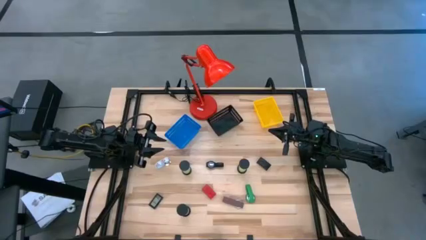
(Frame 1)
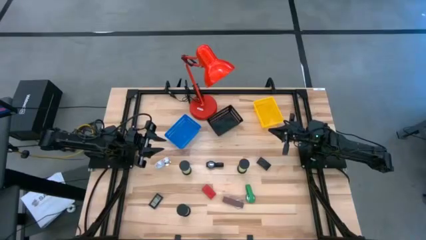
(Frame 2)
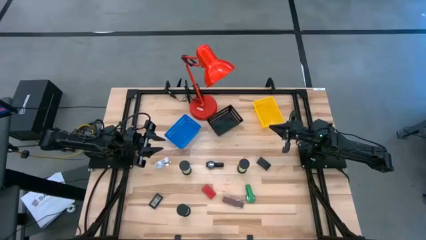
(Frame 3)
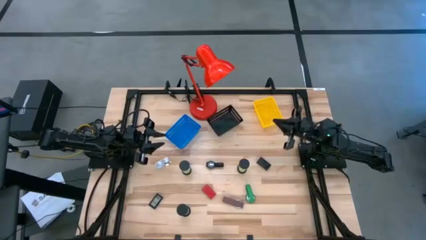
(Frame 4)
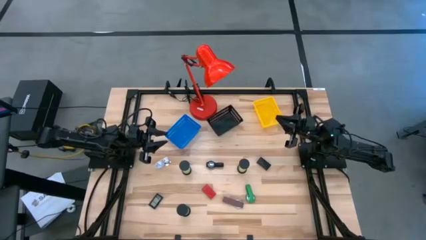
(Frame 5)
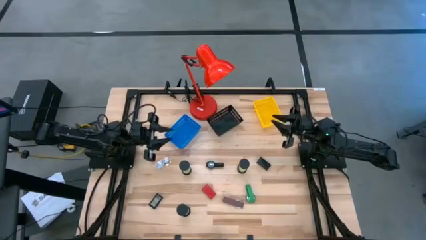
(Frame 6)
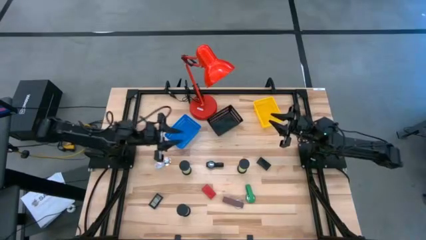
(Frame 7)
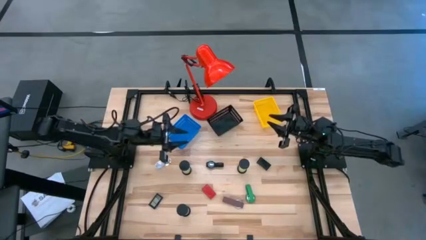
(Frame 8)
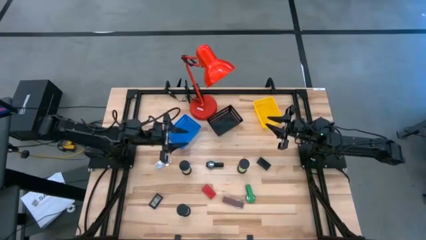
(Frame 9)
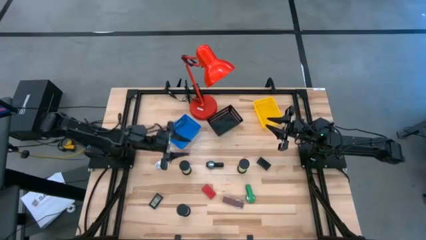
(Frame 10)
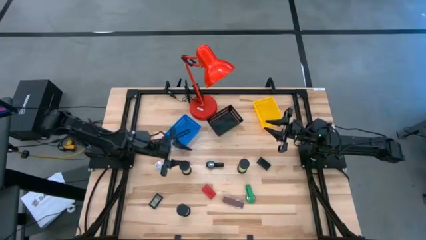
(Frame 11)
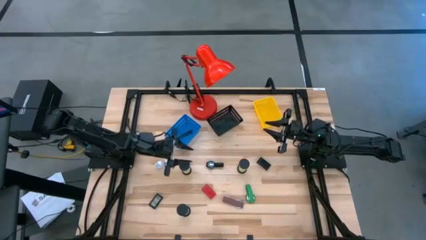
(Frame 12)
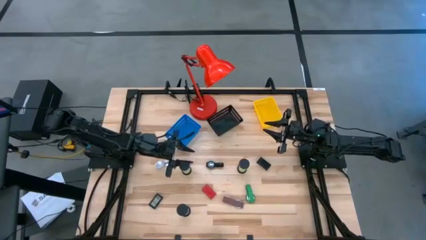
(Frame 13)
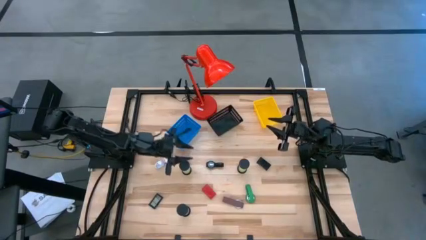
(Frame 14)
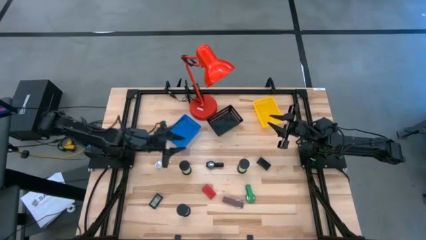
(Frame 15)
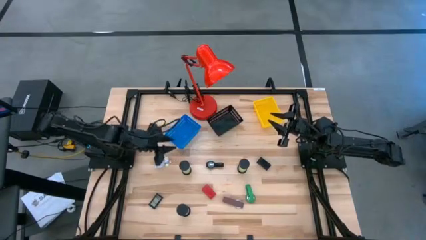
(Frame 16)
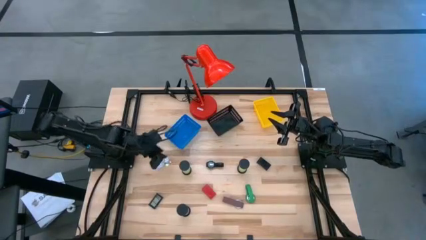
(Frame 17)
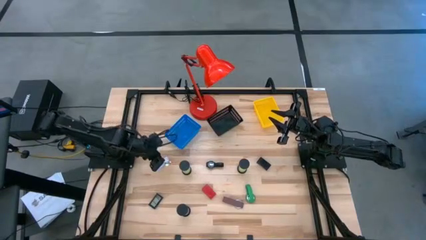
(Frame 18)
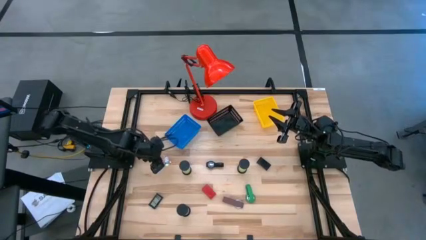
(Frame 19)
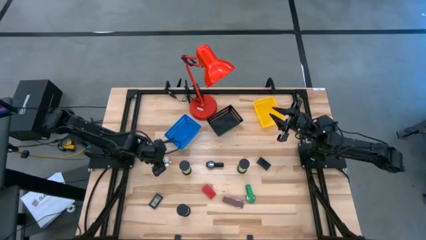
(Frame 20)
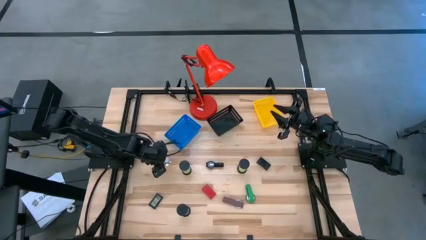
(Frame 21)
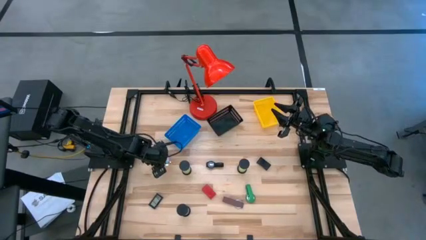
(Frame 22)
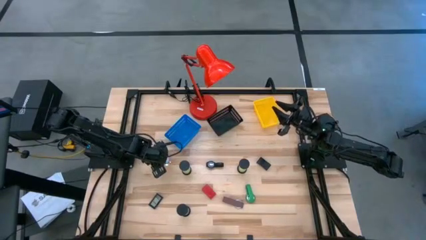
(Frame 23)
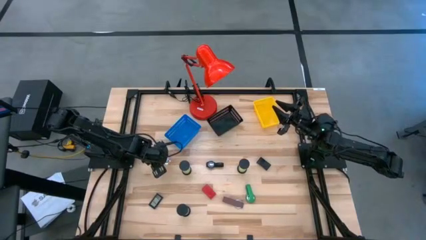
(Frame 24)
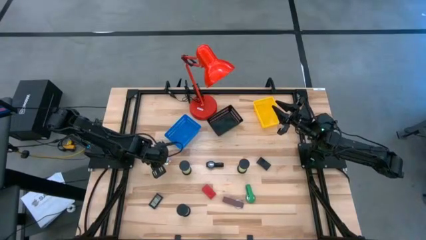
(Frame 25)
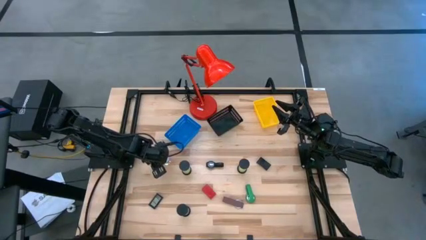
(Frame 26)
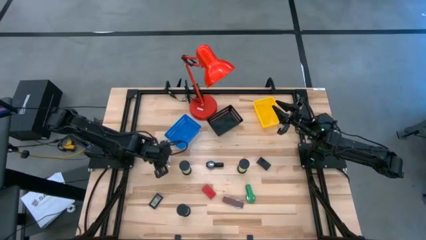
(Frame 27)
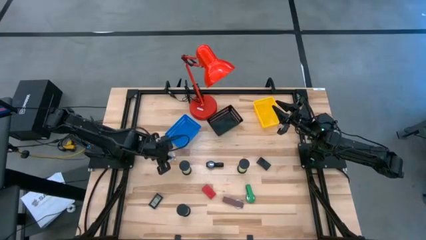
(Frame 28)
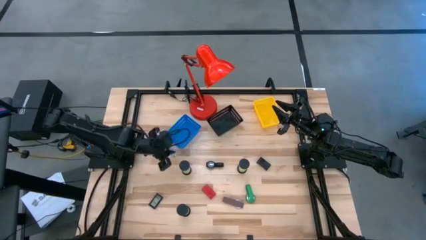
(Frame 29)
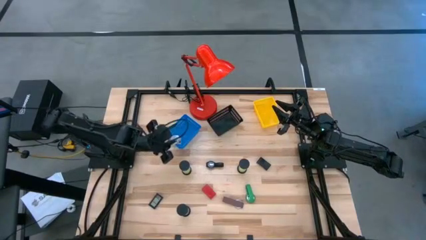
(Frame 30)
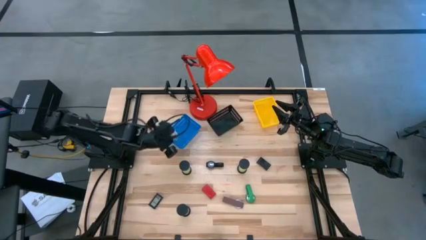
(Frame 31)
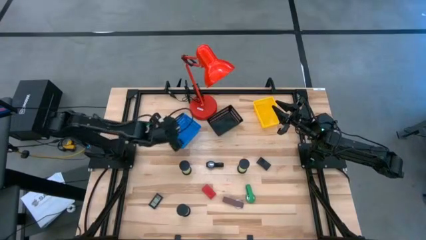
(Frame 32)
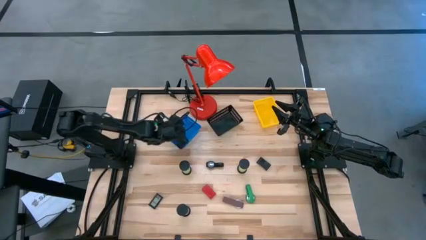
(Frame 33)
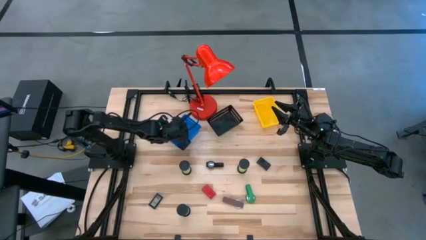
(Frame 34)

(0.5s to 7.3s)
Task: Pick & Place Office items
Put the white wristwatch into the blue bin

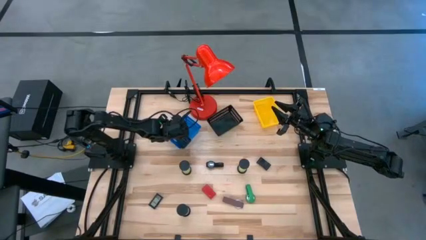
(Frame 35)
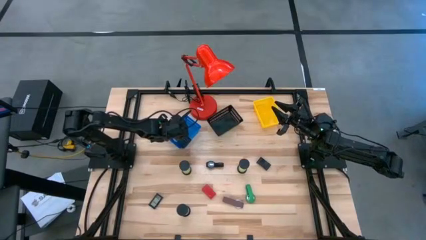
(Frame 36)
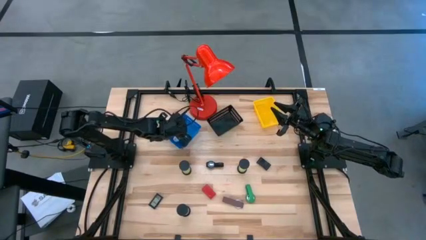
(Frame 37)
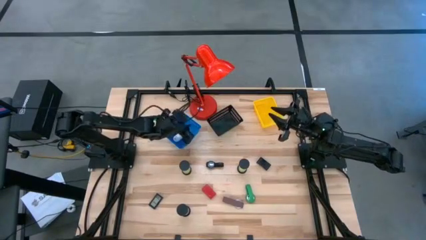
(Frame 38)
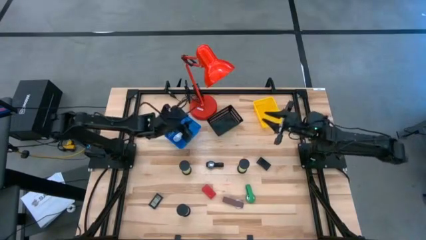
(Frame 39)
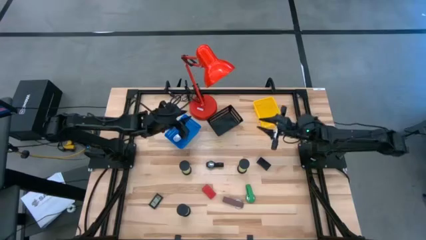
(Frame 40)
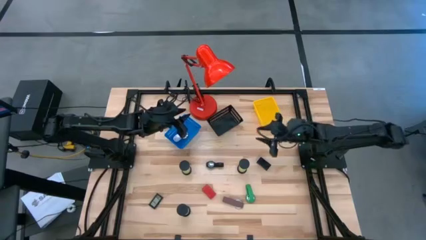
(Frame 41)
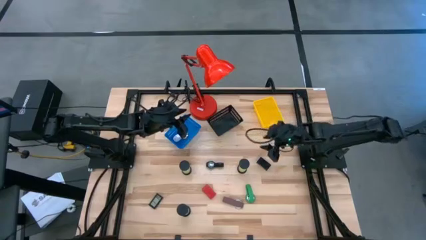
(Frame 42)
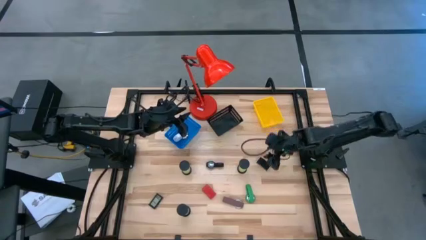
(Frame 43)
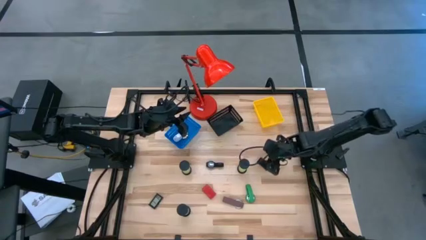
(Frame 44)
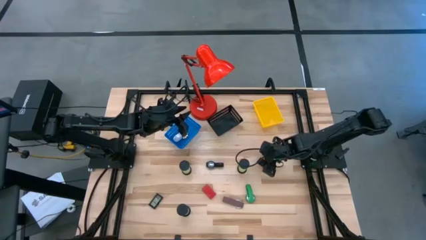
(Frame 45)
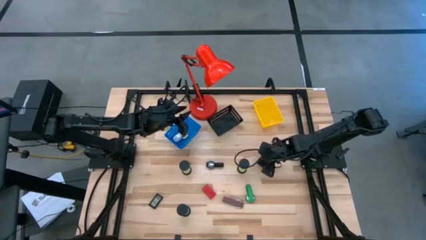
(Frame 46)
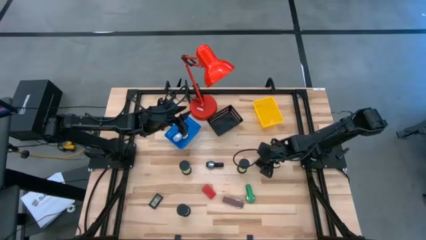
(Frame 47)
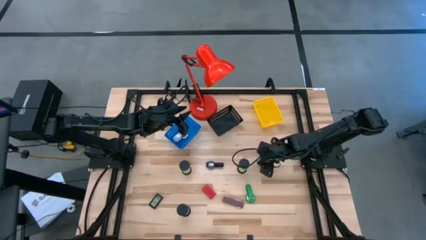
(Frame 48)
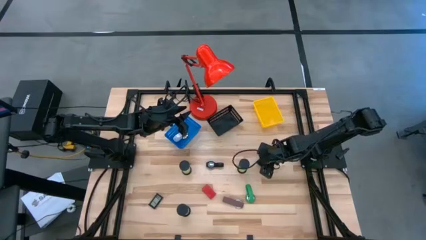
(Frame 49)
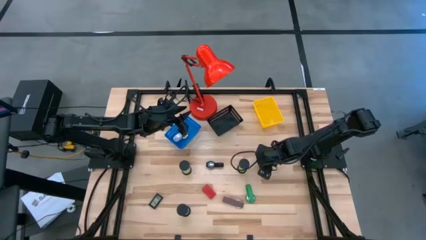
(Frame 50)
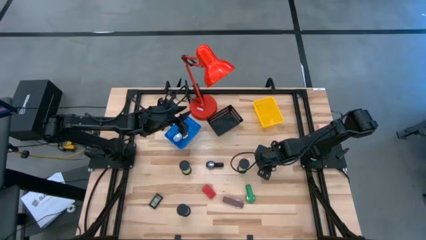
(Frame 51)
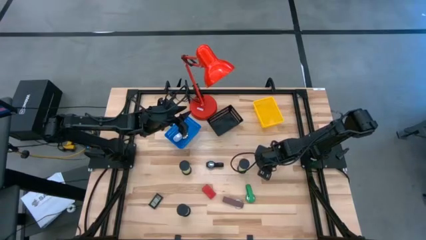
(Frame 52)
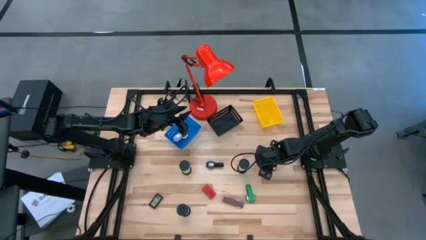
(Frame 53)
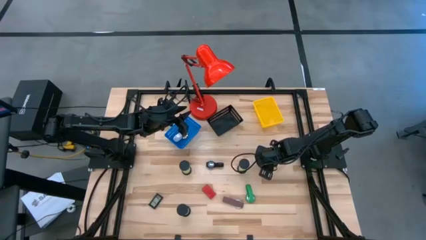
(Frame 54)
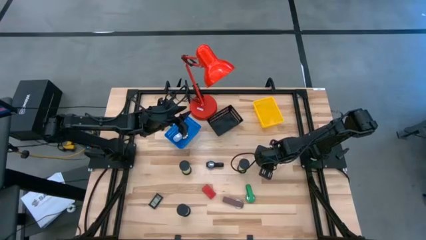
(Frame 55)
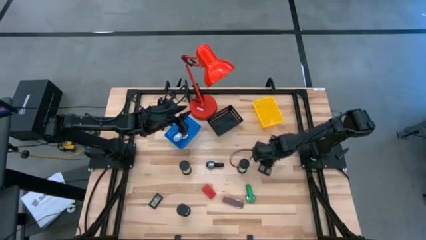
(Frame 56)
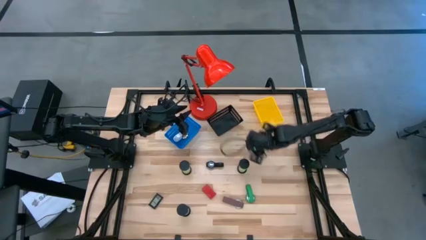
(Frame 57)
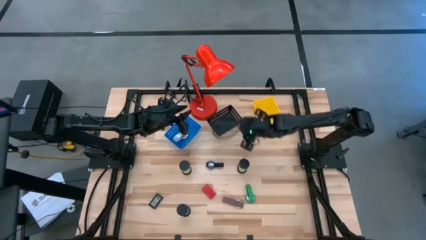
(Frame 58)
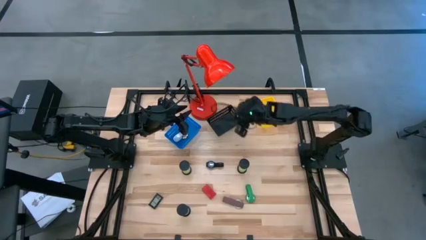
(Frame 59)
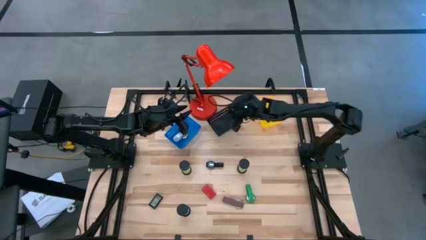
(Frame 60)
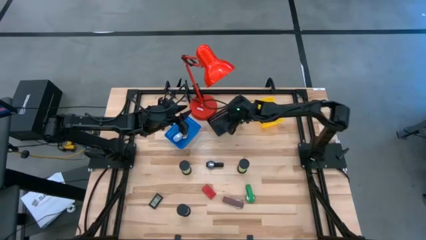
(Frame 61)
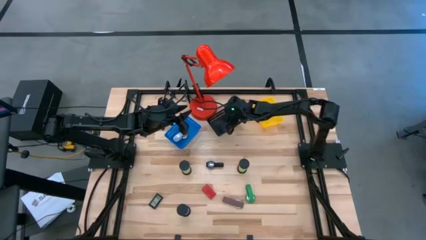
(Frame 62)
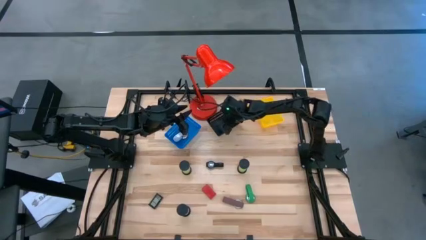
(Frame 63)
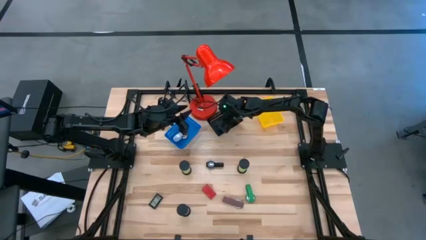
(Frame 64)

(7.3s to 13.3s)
Put the right black digital clock into the black bin

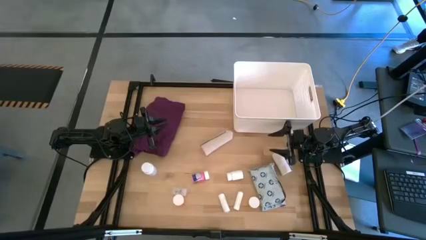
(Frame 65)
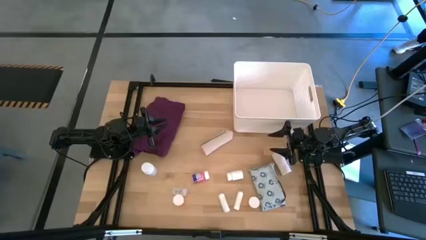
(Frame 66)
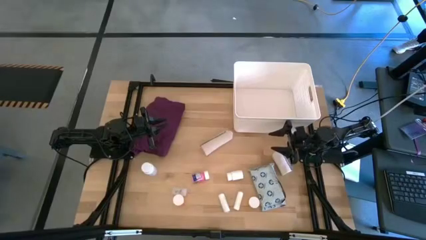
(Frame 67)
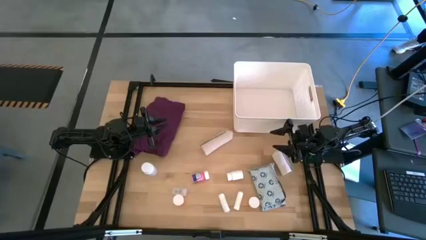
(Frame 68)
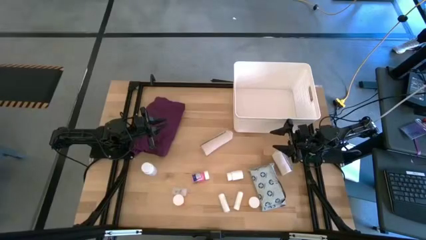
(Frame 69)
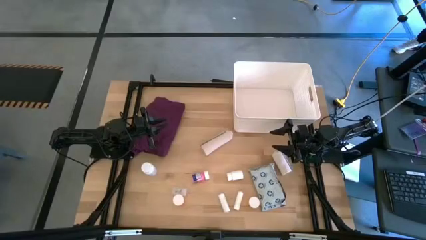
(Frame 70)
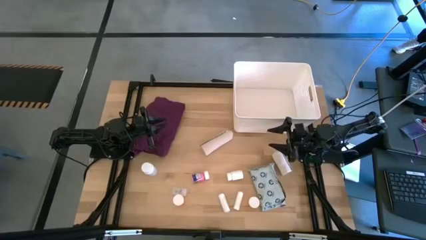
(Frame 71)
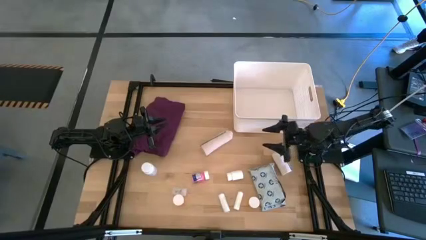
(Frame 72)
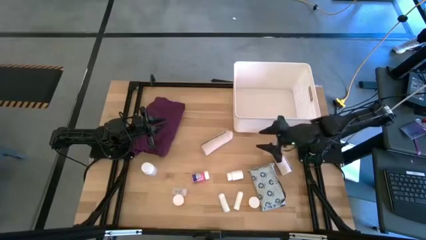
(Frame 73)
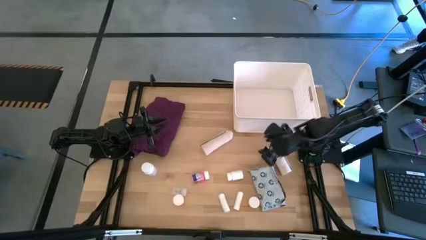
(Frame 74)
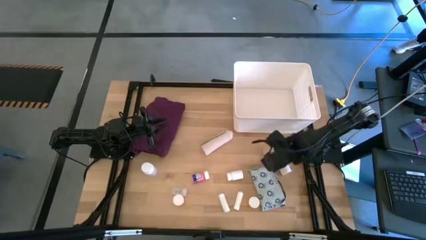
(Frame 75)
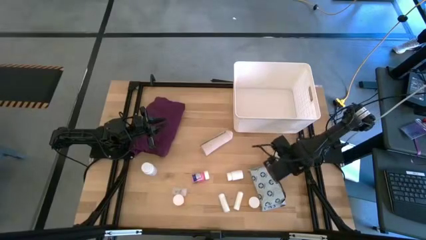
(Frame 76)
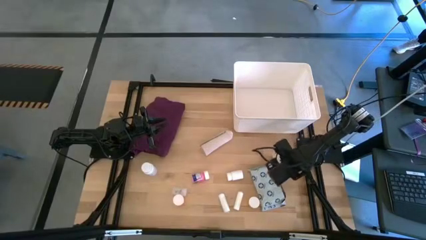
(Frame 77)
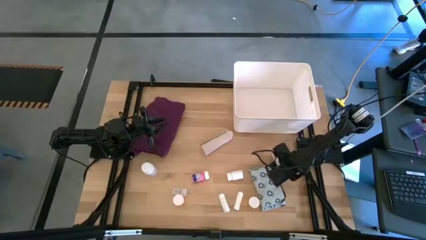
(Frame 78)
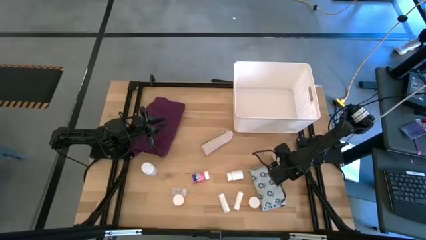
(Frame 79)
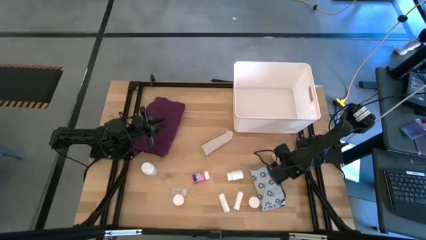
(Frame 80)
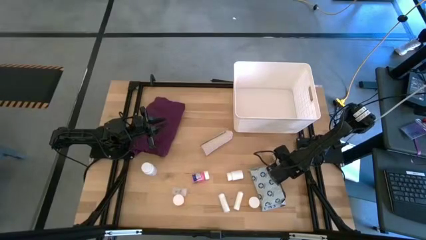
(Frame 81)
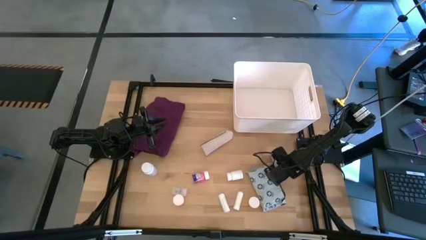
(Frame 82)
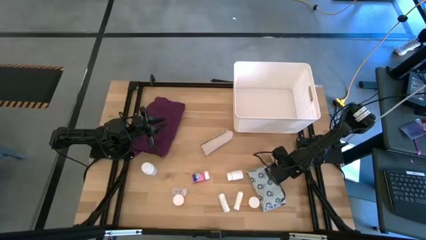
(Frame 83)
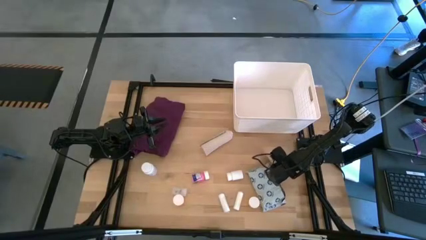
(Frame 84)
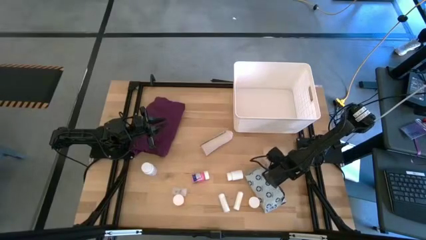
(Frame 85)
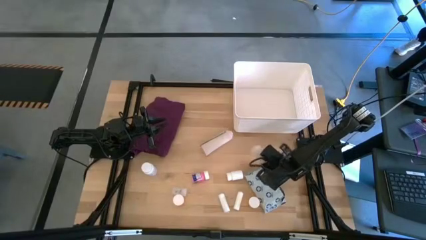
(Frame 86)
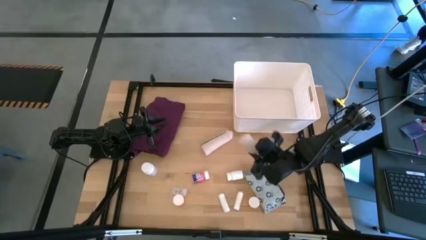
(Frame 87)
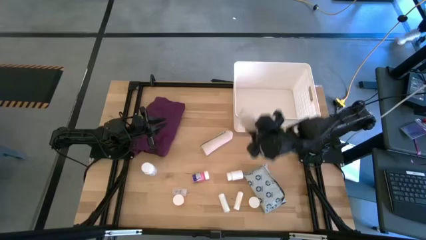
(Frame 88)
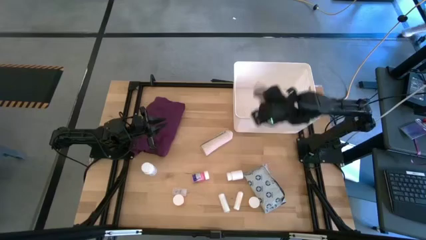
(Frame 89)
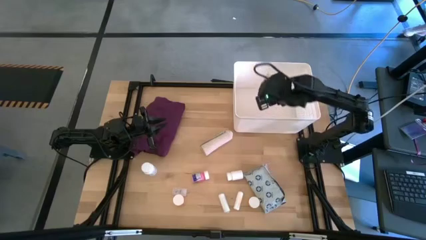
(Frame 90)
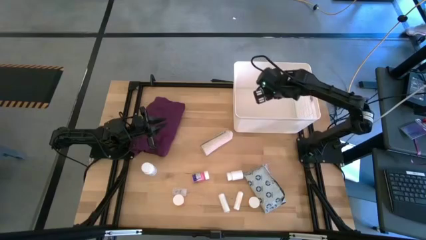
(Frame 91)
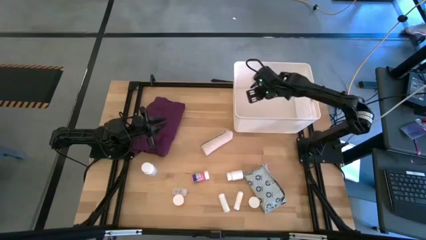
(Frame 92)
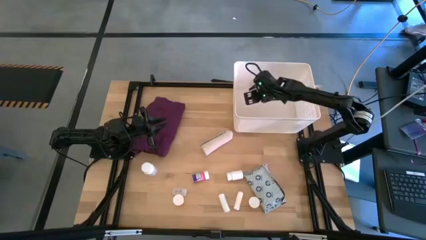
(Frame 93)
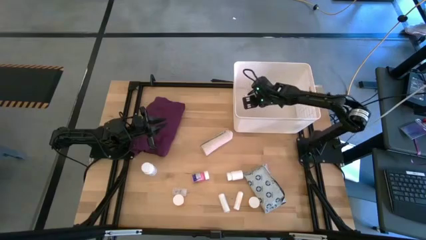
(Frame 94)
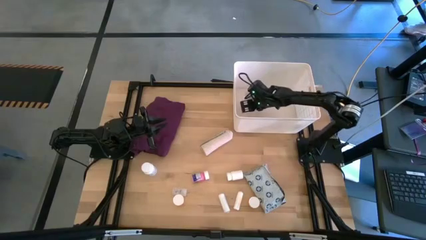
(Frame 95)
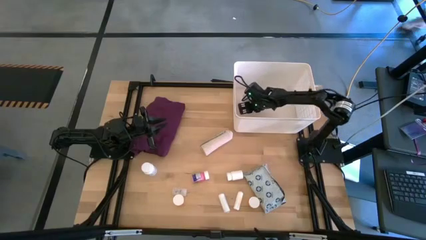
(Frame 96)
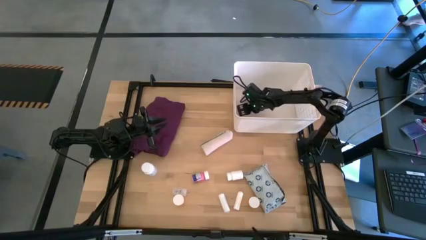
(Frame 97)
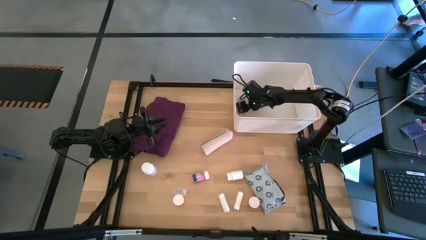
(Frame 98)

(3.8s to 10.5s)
Task: Pick & place medical supplies in basket/bin
Put the right white bandage into the white bin
